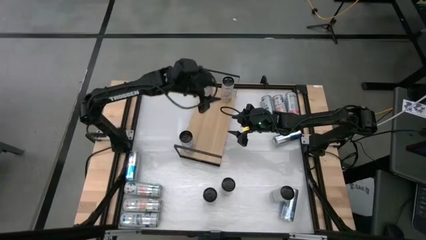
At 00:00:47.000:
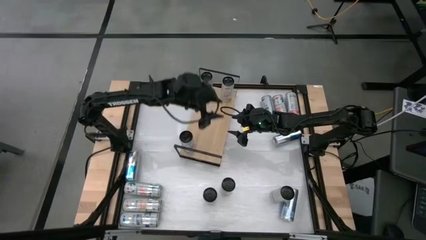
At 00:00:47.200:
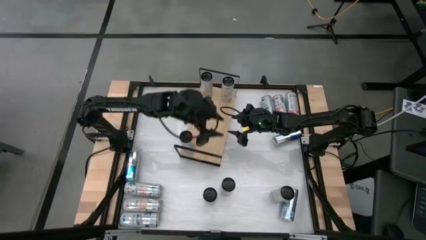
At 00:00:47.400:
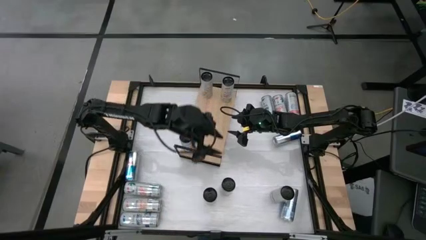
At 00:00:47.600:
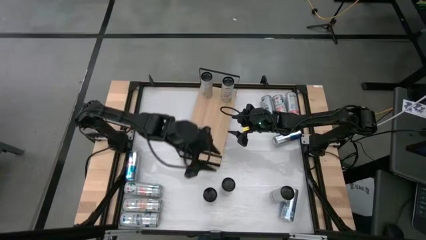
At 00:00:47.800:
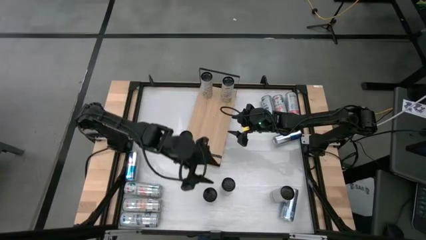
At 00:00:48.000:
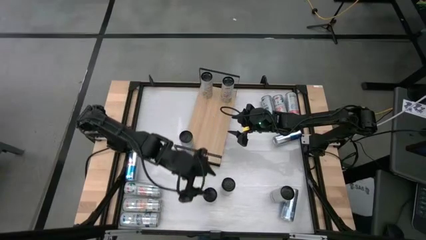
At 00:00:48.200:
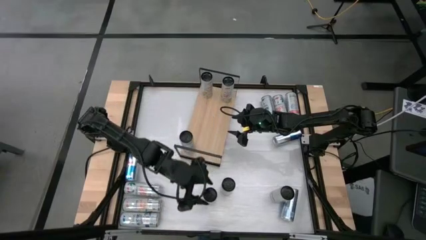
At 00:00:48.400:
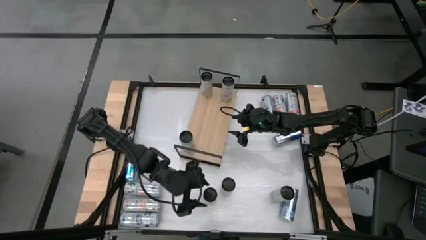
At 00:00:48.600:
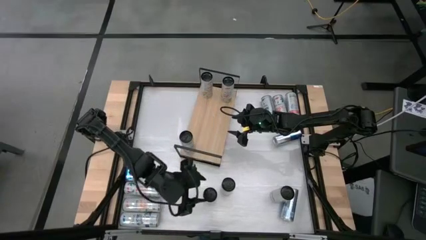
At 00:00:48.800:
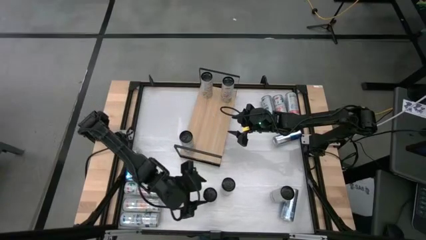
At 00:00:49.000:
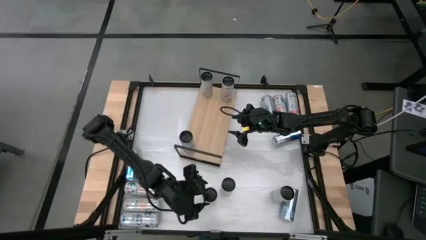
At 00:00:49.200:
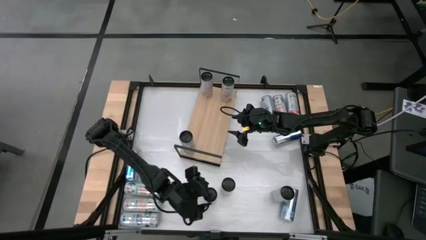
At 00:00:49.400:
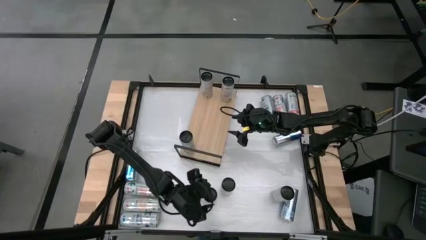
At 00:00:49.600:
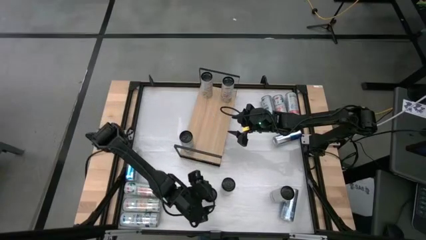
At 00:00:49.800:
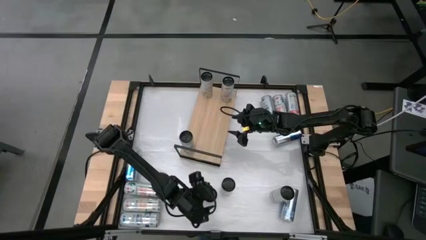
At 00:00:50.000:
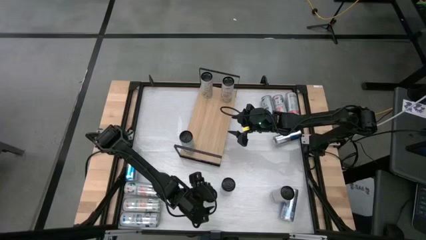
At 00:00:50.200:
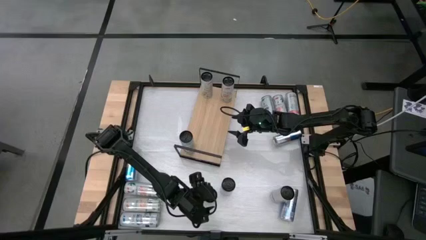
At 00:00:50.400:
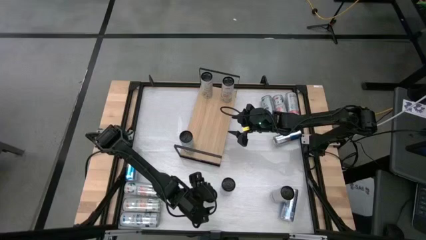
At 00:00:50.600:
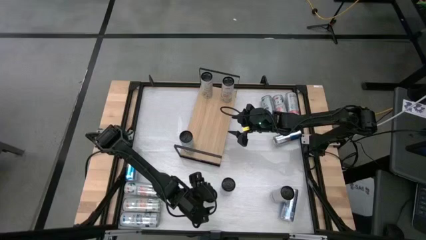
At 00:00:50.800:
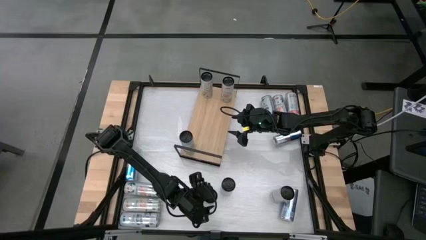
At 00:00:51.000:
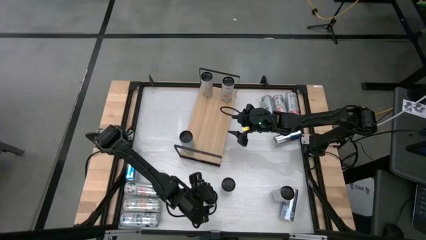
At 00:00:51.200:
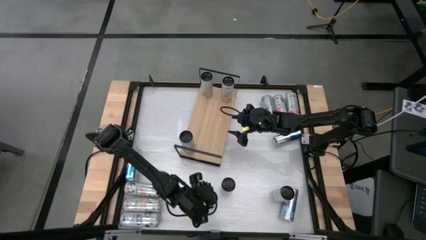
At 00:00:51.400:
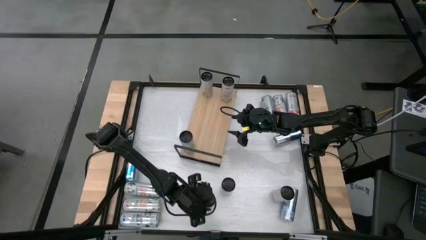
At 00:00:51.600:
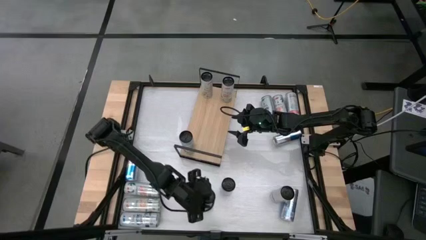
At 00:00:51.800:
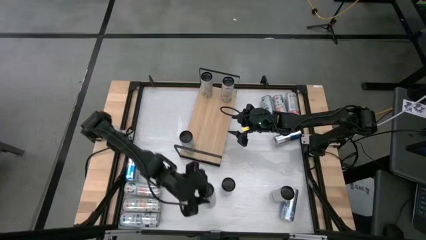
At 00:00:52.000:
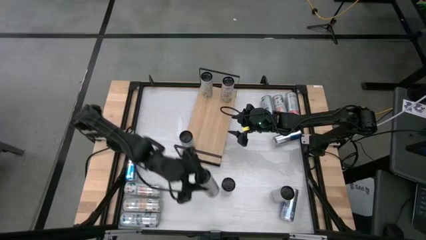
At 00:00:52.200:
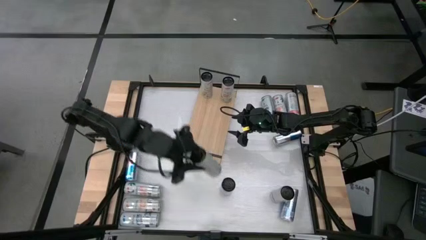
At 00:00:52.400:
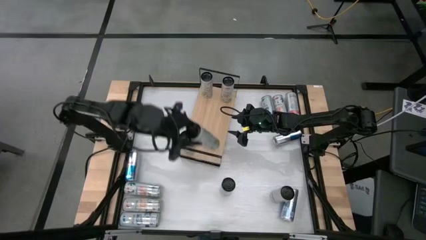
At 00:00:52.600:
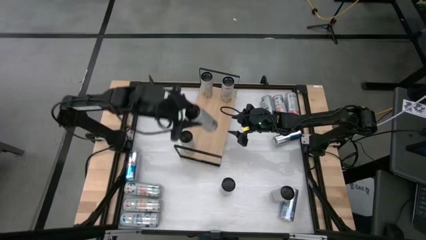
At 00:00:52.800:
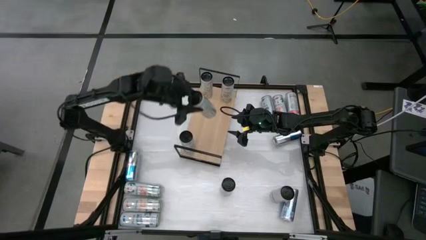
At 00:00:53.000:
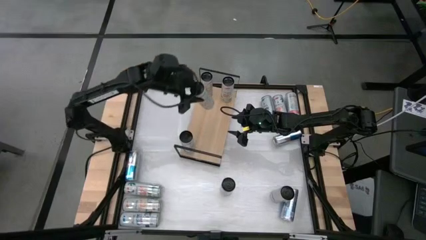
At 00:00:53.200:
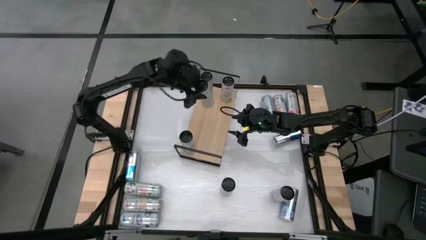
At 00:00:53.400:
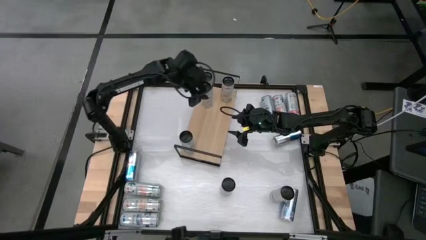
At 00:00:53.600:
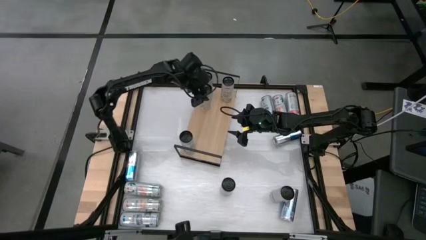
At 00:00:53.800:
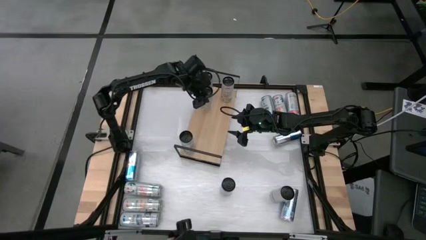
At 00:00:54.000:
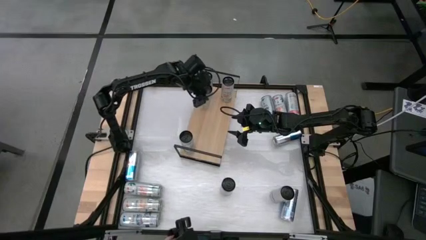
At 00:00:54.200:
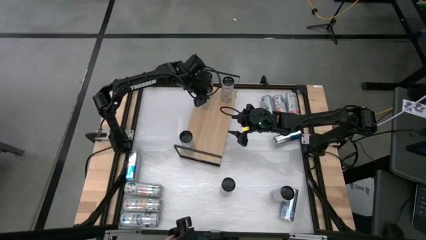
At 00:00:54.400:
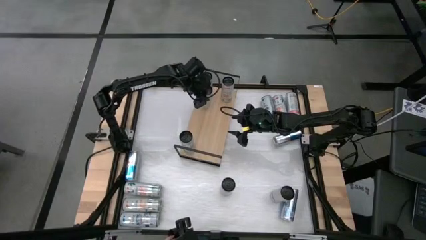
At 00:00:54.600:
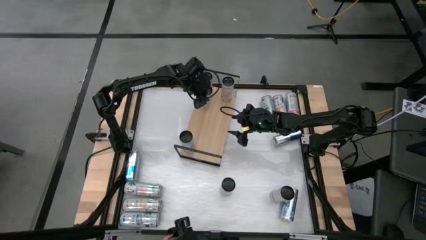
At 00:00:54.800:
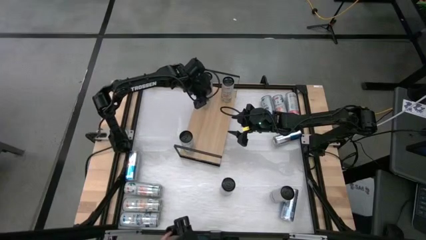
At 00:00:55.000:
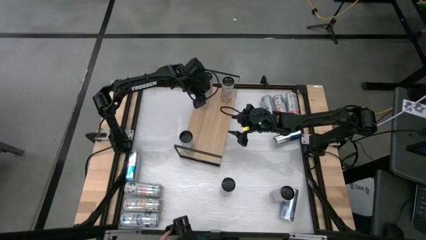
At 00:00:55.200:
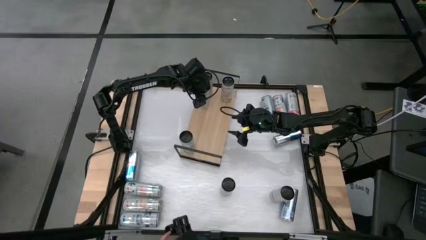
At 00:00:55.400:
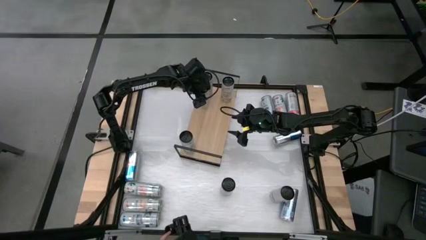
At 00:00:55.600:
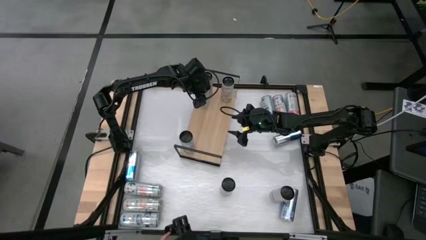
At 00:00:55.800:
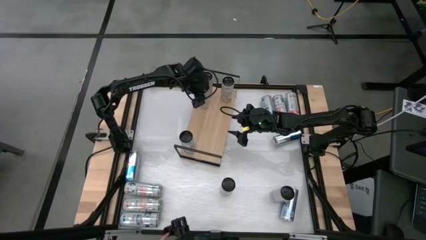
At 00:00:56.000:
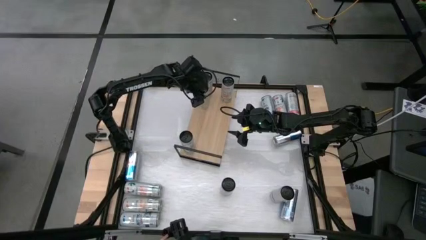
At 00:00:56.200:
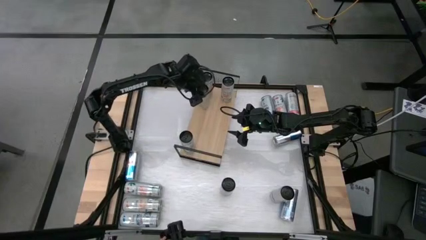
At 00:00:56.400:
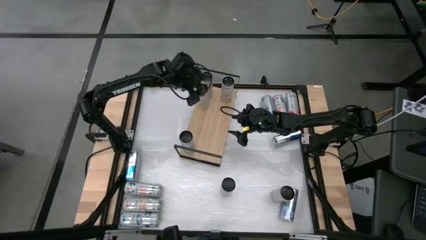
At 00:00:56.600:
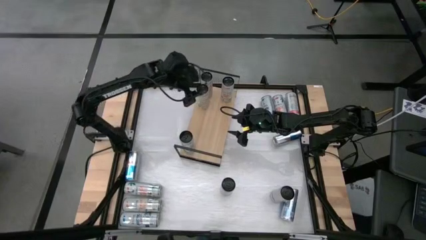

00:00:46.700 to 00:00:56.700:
Task: Place canned beverage on shelf
Put the bottom center orange soda can on the shelf aligned with the other orange soda can

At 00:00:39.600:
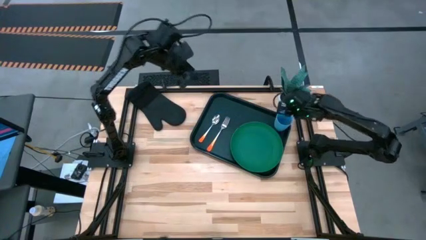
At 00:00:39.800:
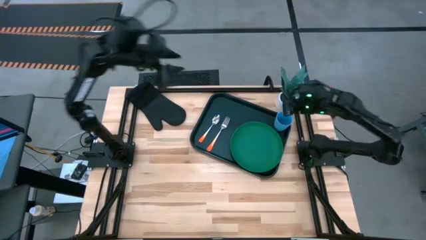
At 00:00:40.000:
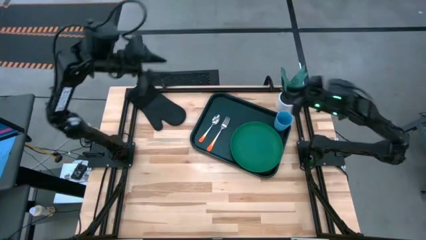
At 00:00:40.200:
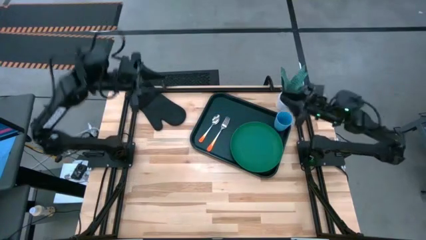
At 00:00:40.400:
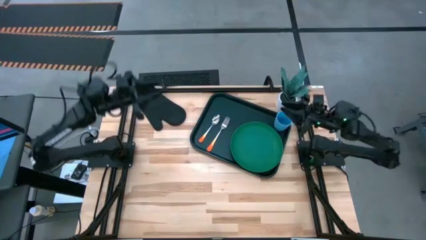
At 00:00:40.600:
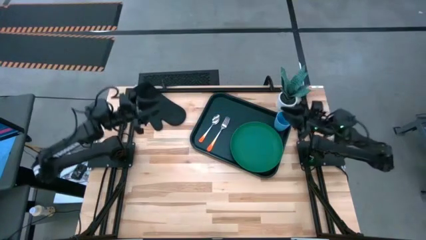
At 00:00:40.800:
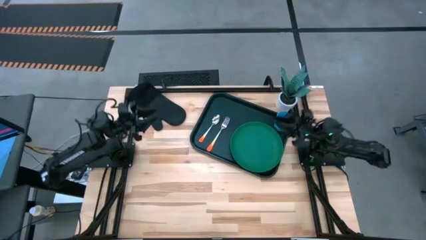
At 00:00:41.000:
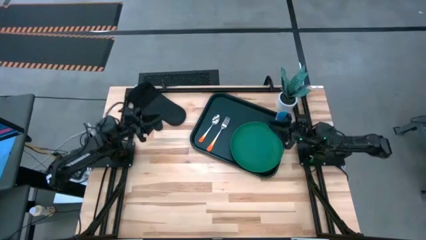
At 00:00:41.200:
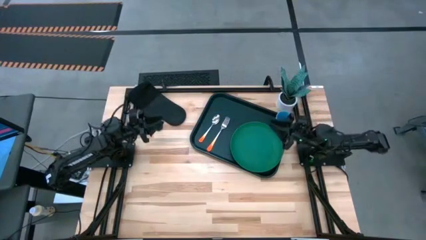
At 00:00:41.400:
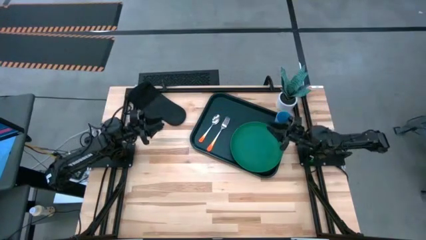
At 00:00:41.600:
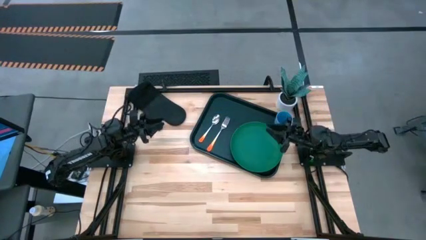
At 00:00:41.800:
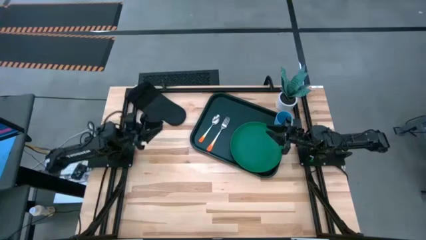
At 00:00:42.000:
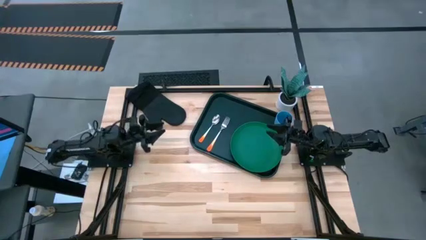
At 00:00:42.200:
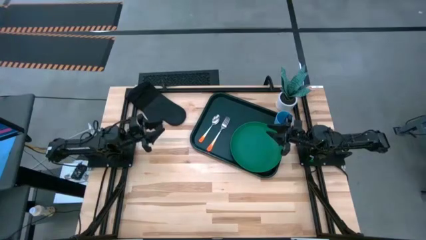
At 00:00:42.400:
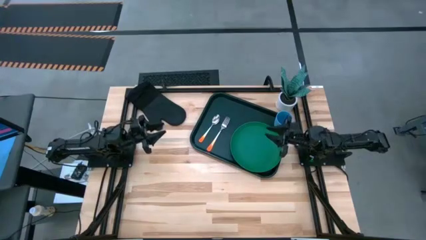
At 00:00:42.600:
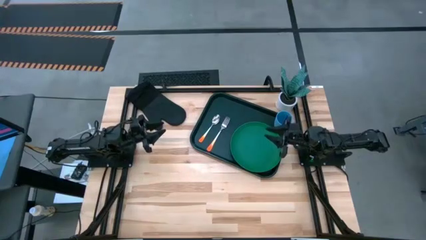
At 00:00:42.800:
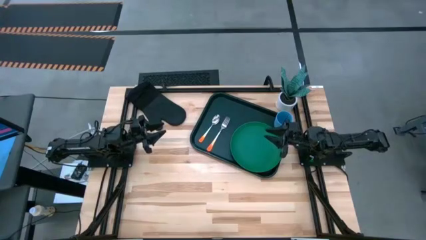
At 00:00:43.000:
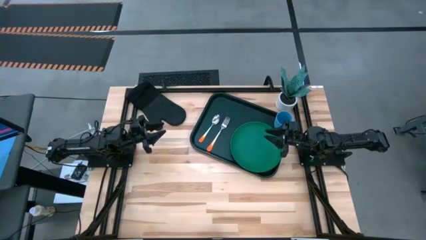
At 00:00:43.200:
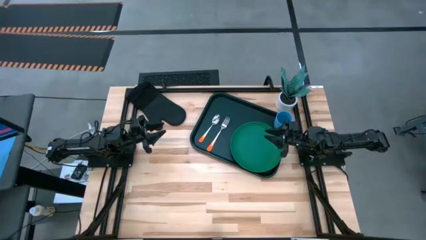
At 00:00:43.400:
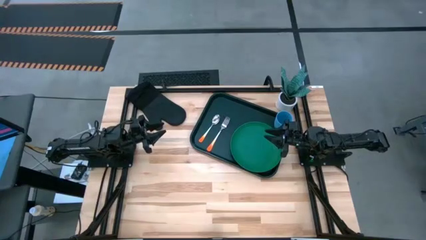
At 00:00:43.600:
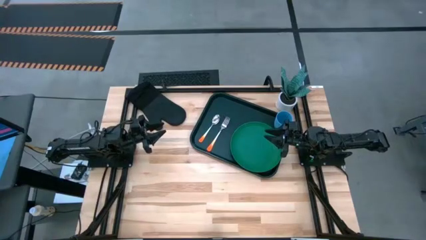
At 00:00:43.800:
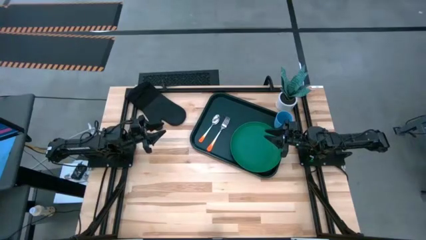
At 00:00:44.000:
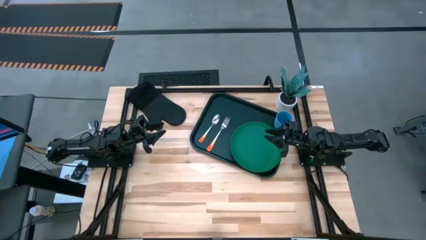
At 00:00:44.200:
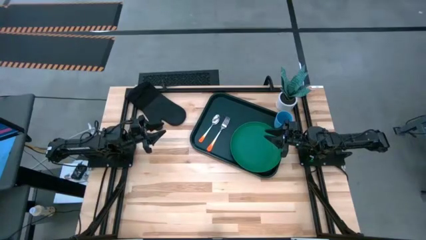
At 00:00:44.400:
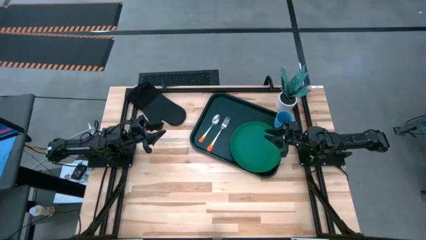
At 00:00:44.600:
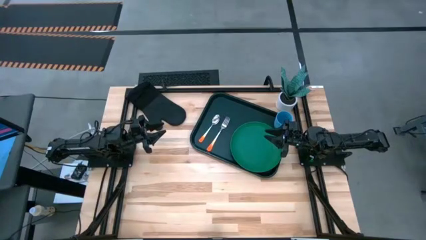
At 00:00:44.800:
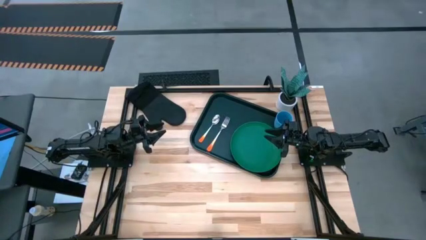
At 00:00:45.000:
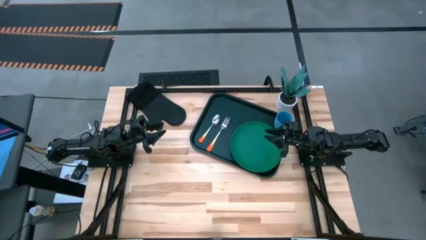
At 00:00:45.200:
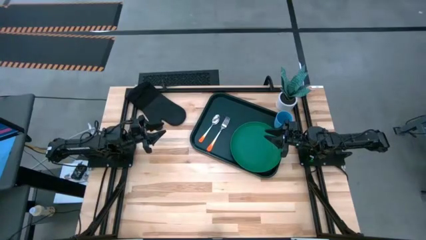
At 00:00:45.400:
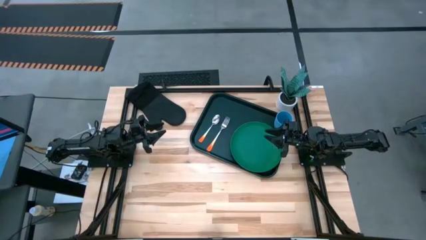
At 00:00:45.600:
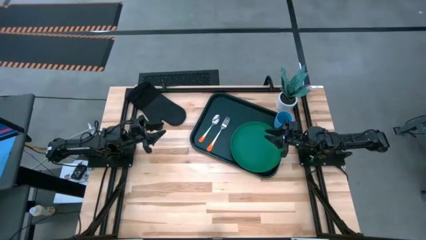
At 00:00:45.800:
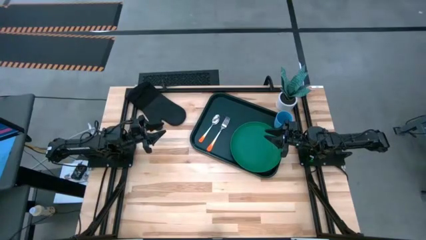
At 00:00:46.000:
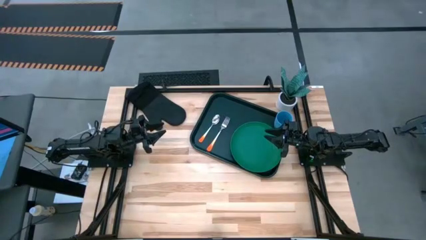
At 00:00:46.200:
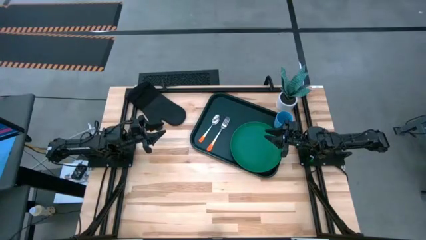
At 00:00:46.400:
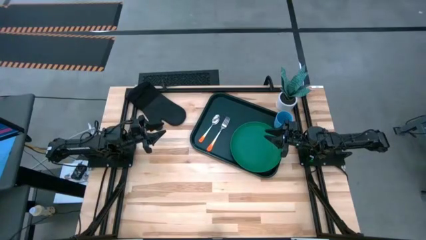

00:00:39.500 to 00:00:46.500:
Task: Pick and place plate/cup/fork/spoon on tray
Return to Home Position
